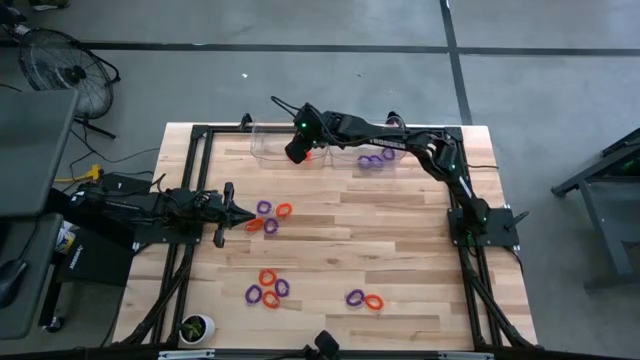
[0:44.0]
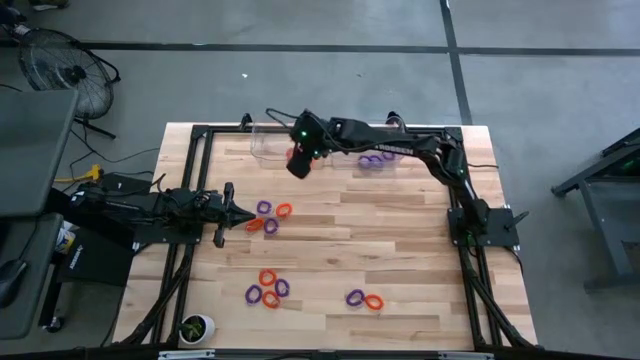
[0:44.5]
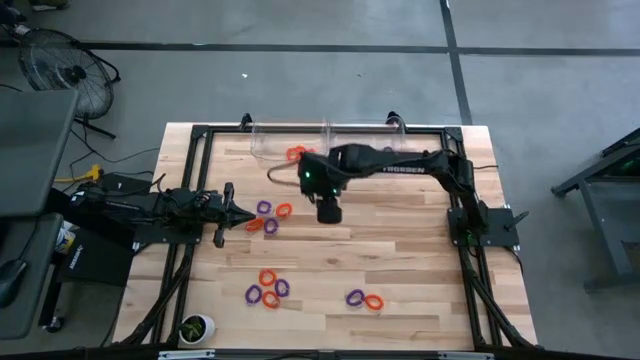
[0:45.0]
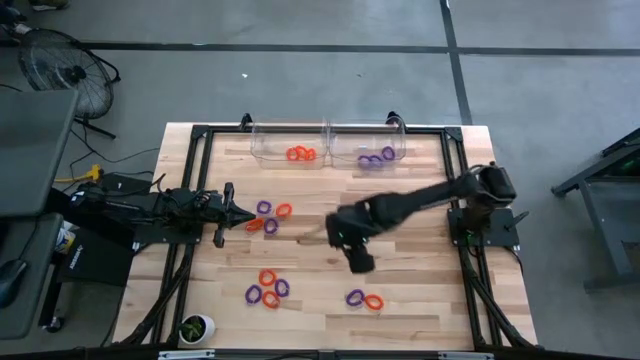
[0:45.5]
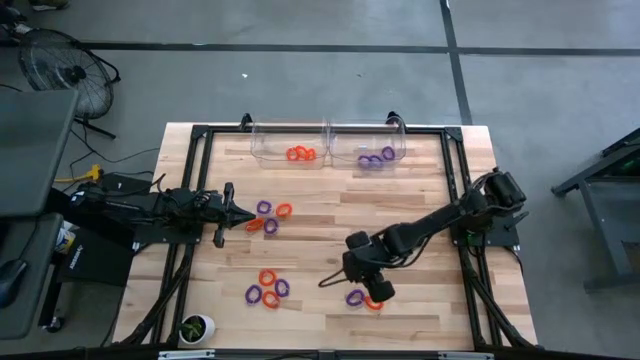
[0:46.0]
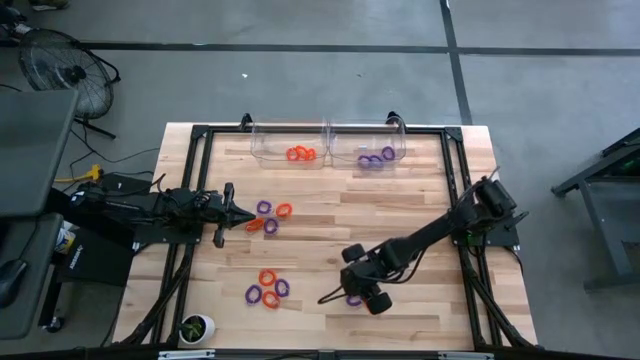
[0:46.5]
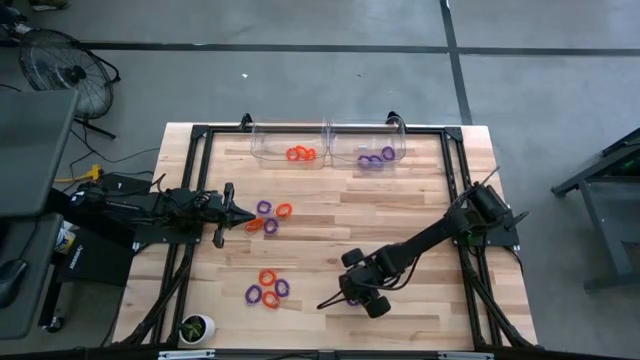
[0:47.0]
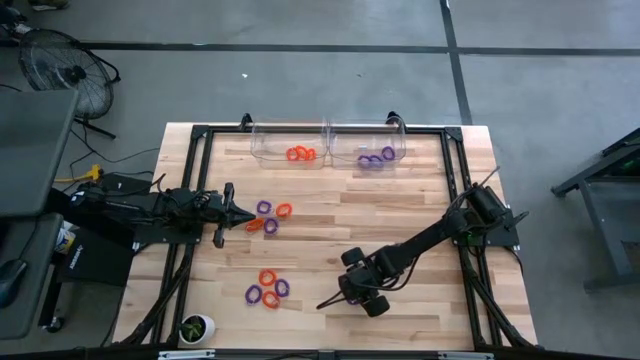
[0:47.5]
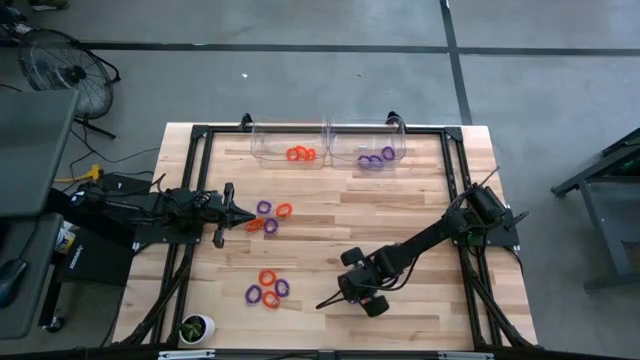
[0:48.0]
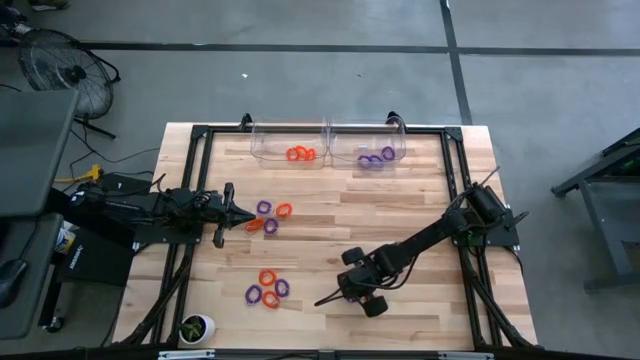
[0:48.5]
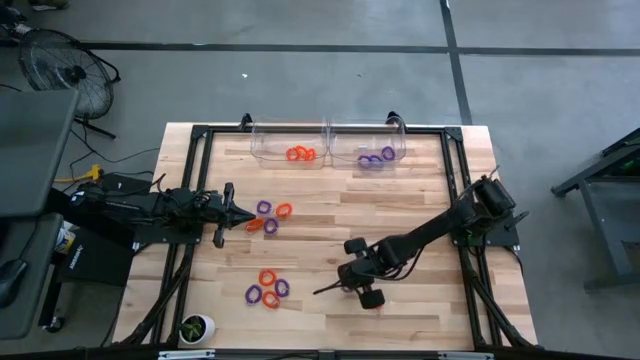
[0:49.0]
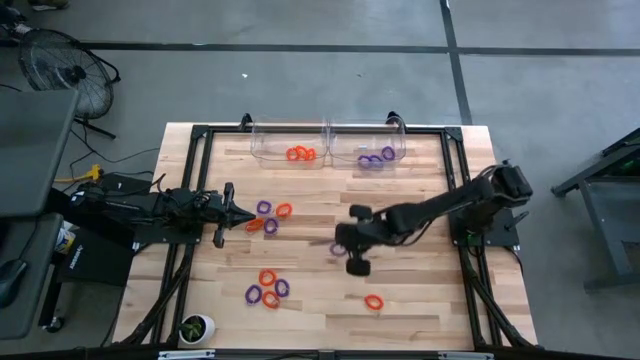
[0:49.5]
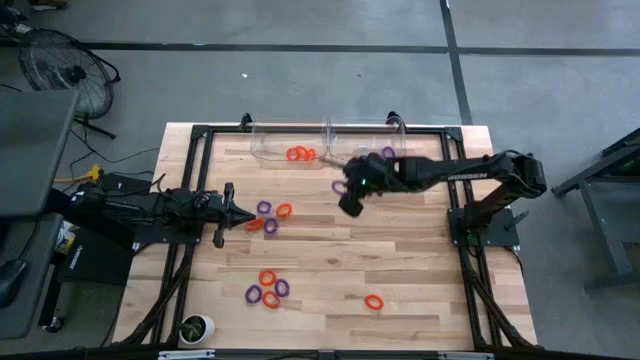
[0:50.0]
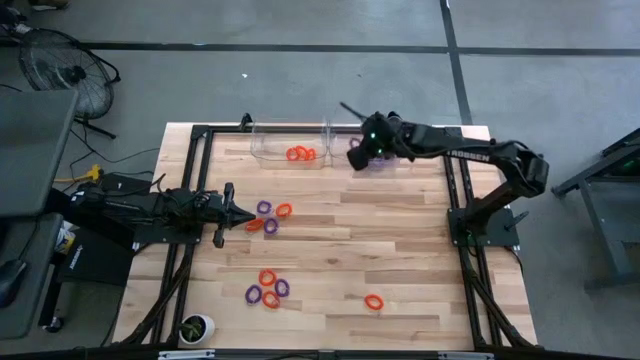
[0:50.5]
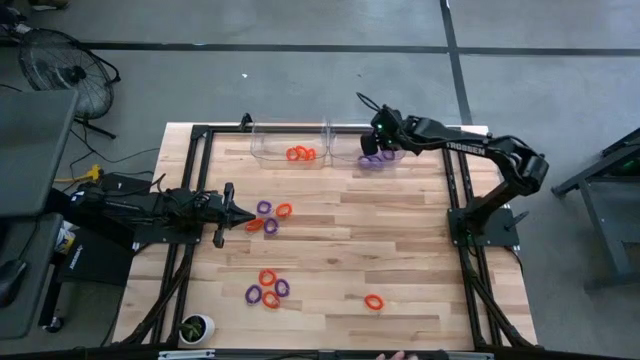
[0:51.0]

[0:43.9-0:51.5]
Task: Sort spring keychains
Put the violet spring keychain into the right transparent bin

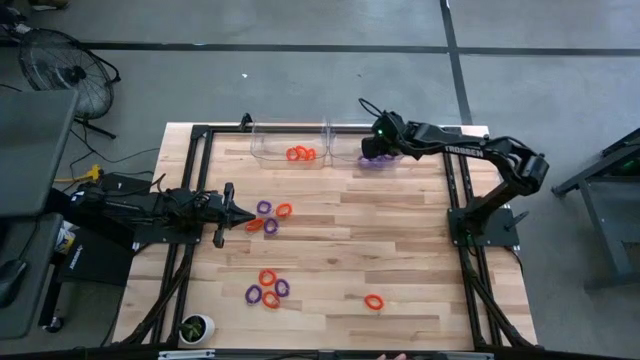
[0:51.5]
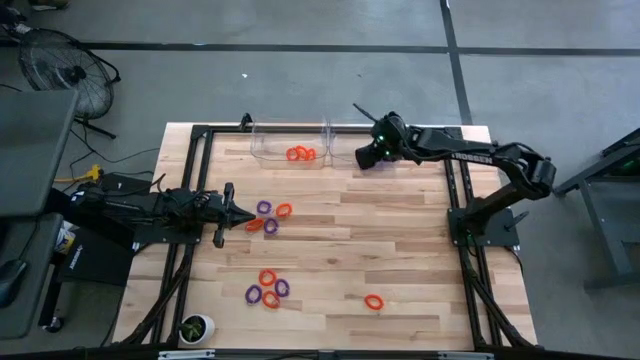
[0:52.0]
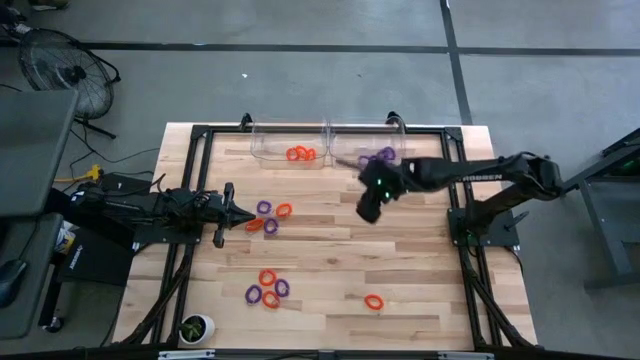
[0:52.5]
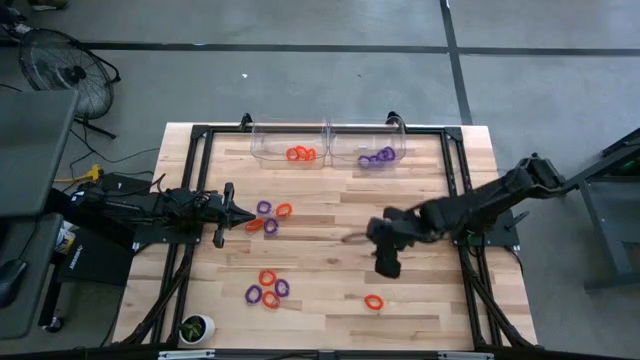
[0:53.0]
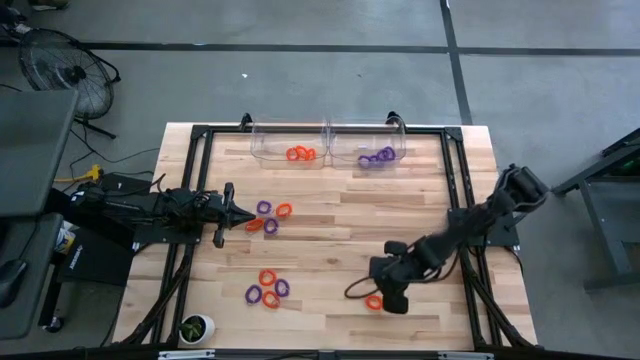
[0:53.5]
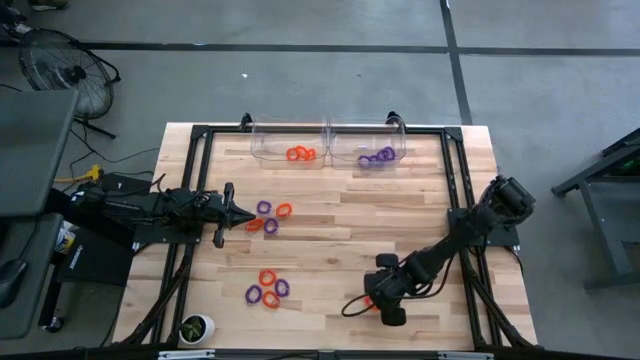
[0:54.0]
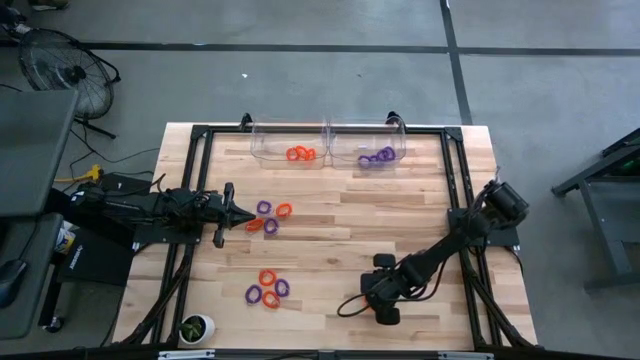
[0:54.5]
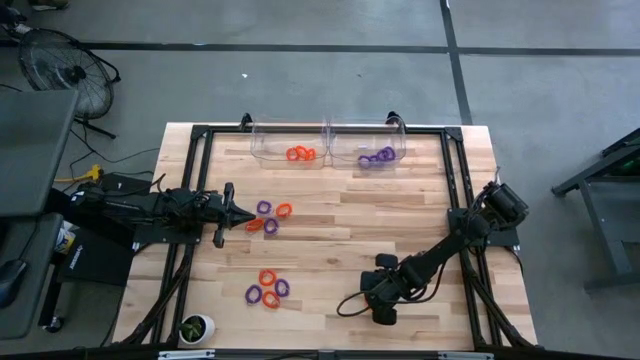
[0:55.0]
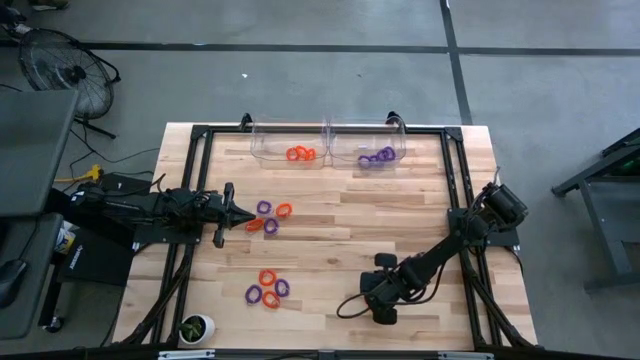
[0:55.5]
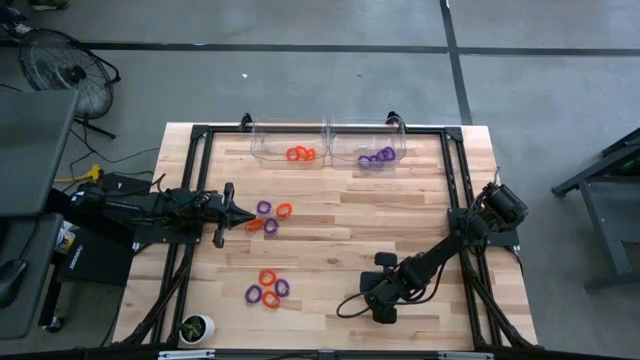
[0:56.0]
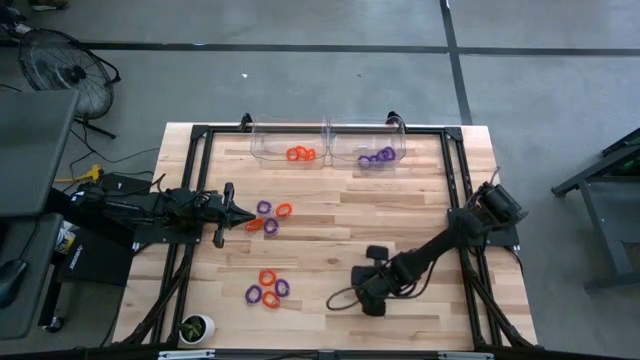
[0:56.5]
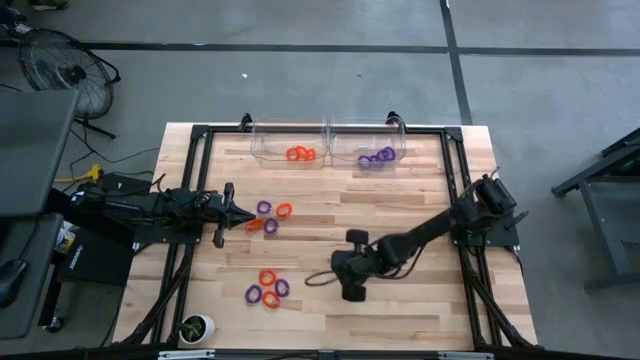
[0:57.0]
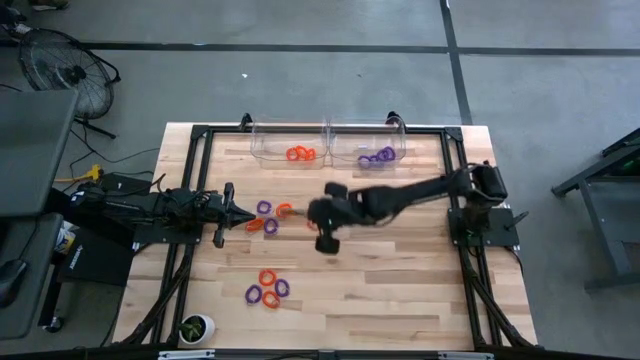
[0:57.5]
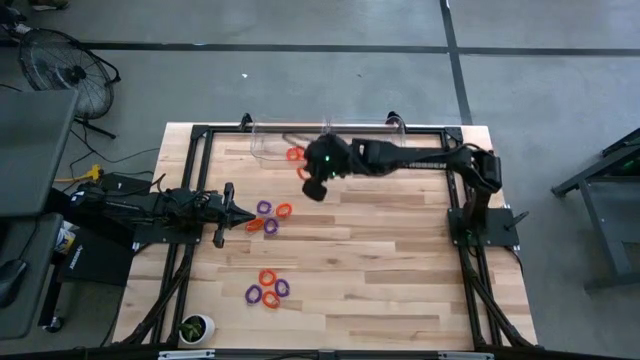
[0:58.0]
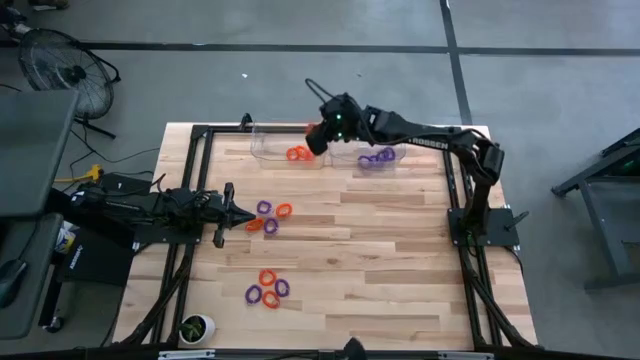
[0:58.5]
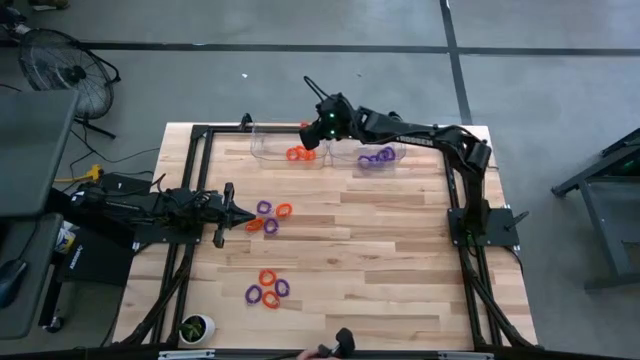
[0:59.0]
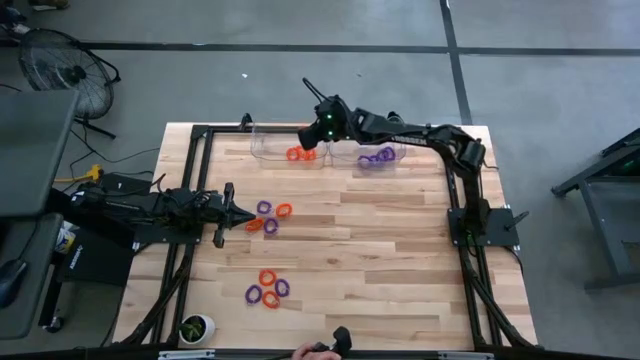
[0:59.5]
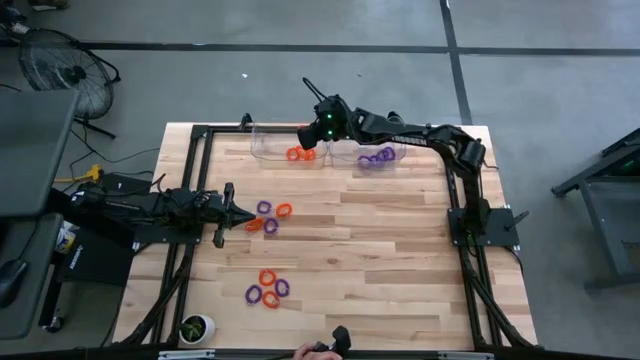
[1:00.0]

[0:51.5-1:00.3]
Put the orange spring keychain into the left transparent bin

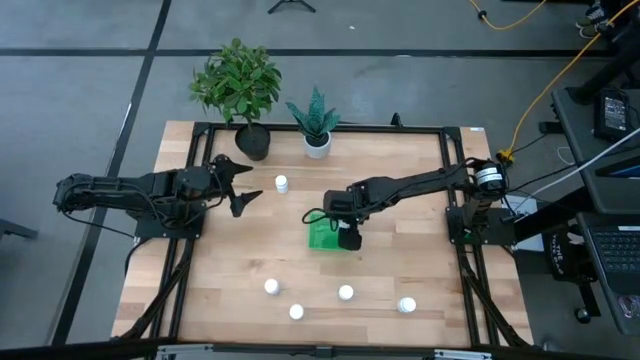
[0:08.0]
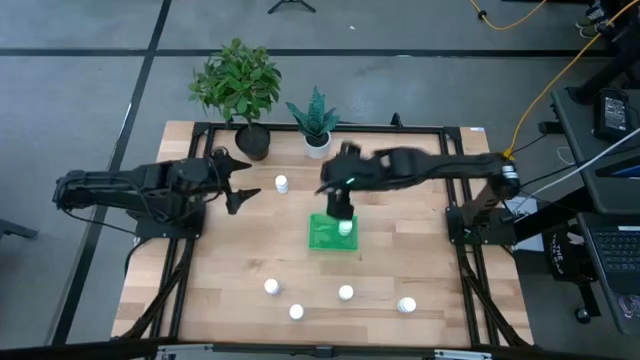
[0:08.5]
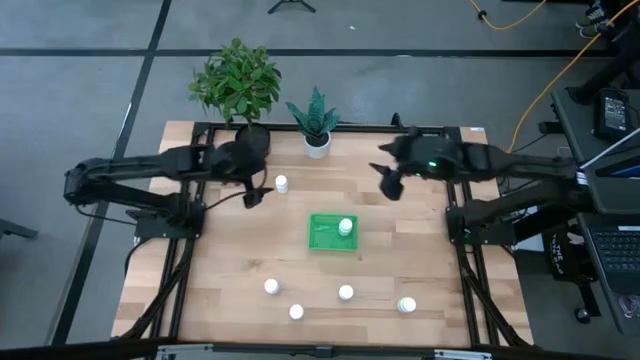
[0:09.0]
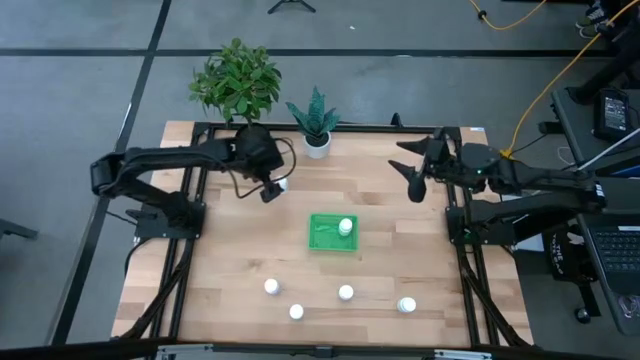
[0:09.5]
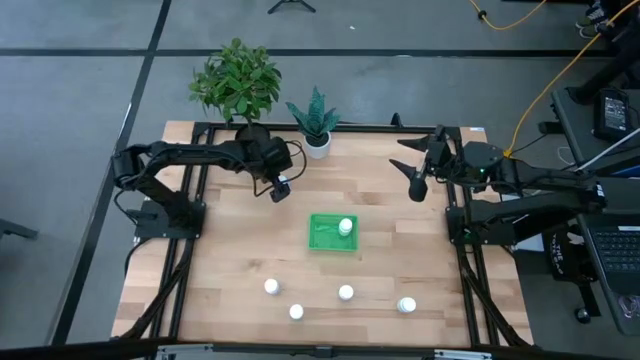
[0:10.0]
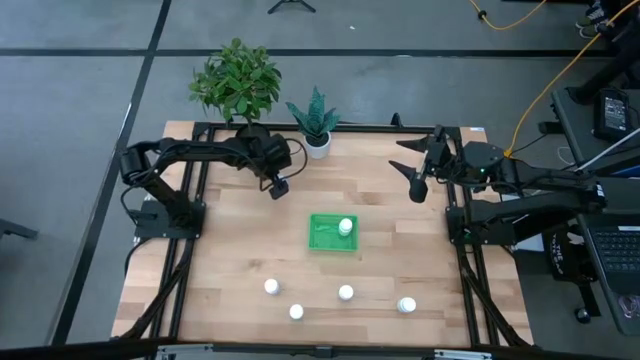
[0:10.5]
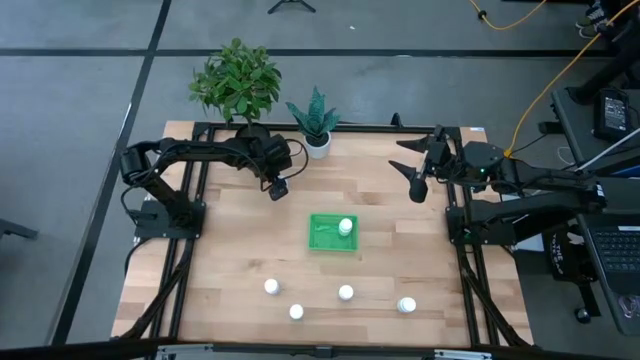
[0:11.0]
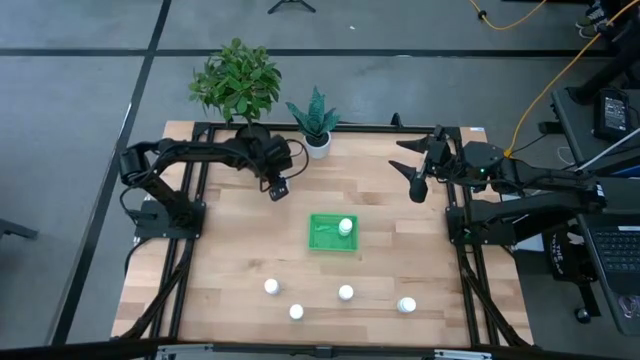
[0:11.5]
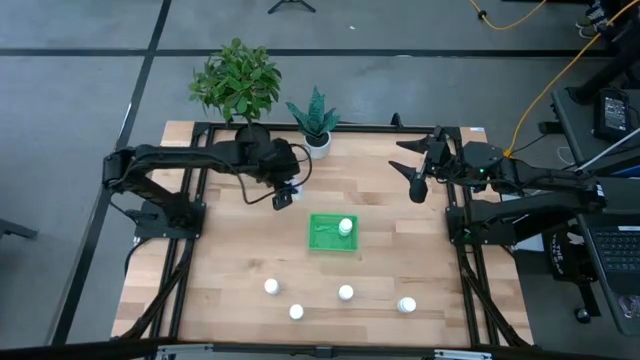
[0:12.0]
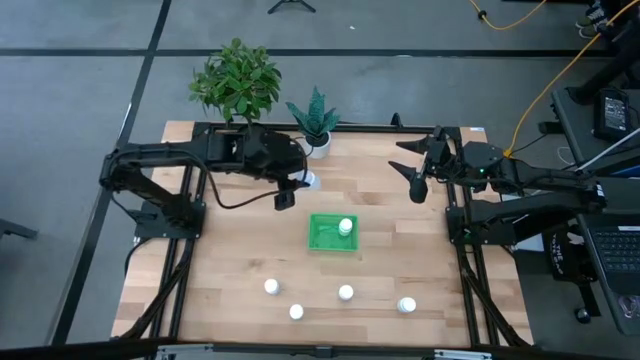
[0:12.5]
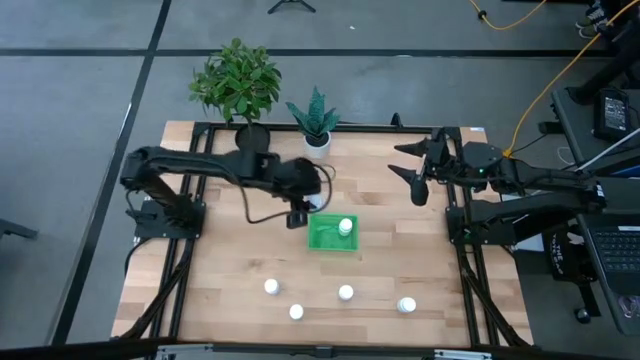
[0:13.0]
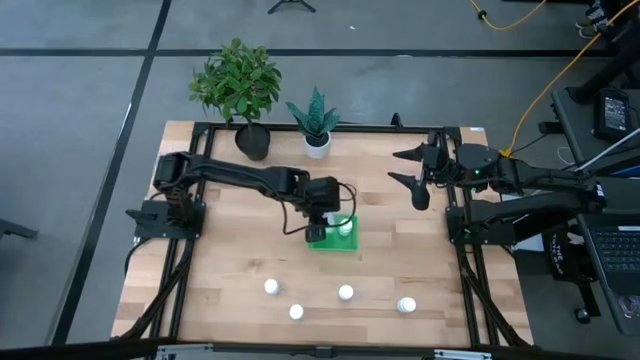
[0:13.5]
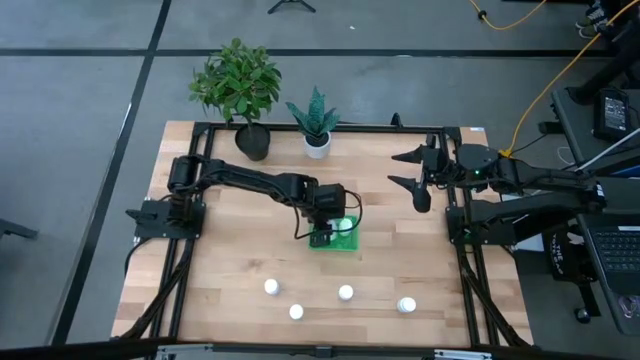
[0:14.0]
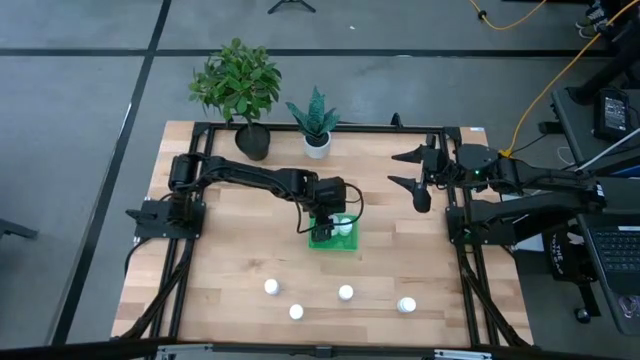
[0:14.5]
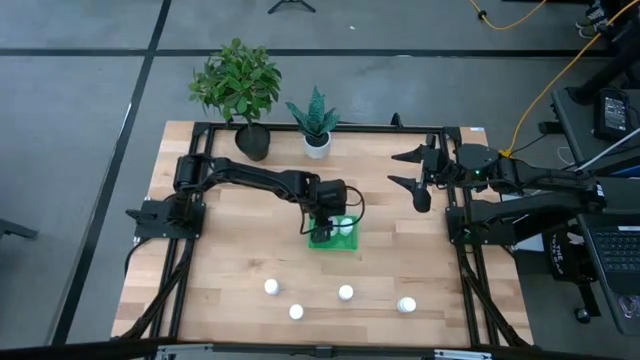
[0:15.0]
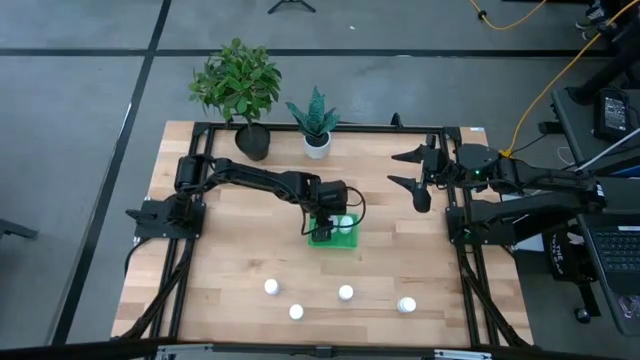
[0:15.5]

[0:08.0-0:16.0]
Task: Pick and place pill bottles into a basket
Put the white pill bottle into the green basket
